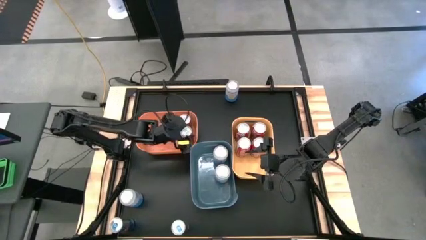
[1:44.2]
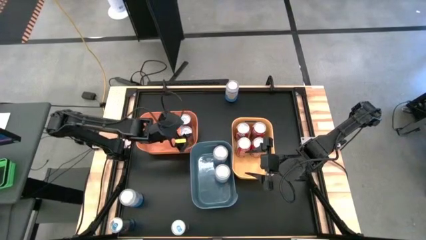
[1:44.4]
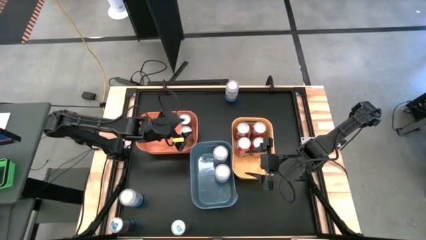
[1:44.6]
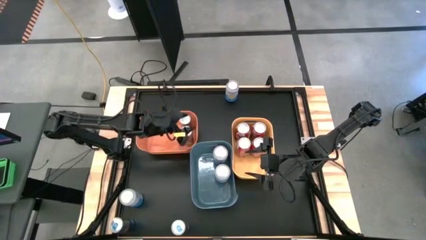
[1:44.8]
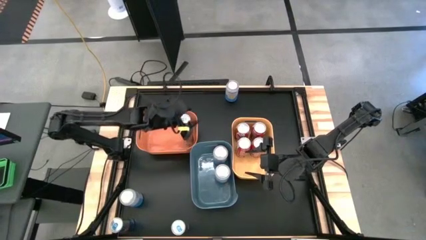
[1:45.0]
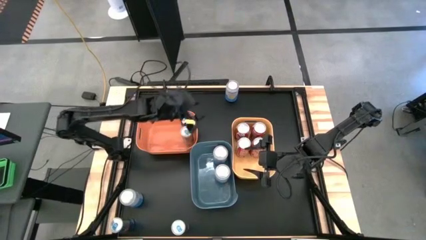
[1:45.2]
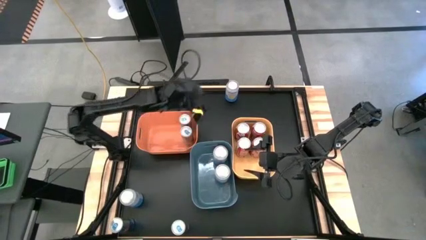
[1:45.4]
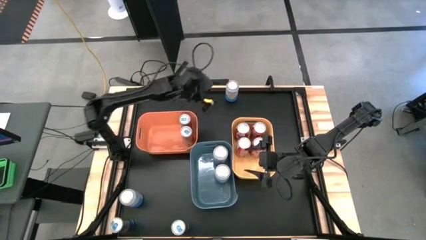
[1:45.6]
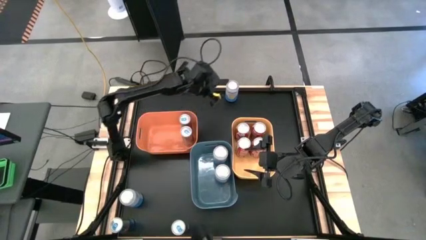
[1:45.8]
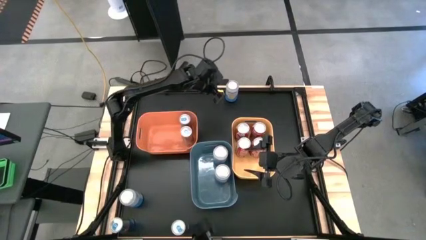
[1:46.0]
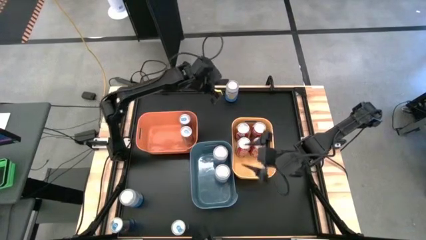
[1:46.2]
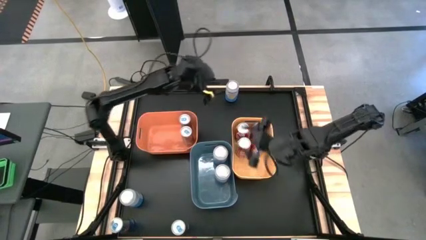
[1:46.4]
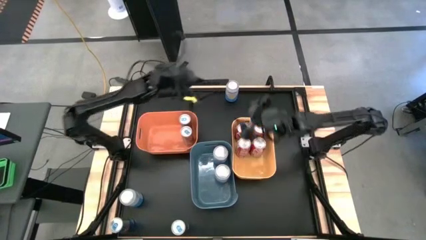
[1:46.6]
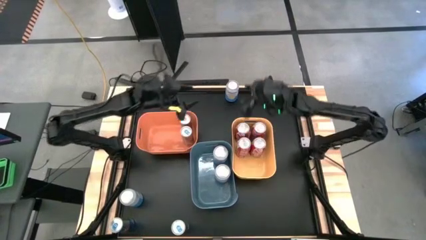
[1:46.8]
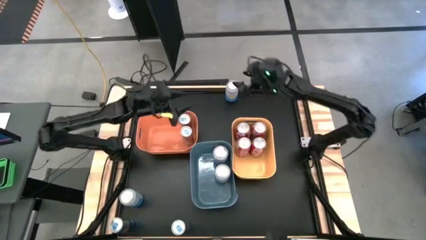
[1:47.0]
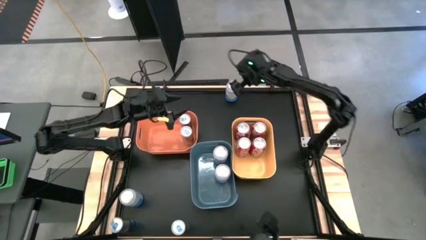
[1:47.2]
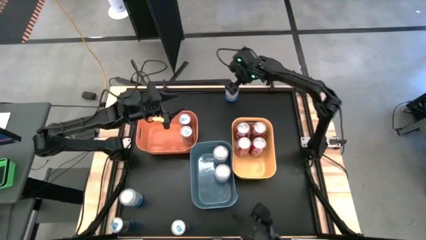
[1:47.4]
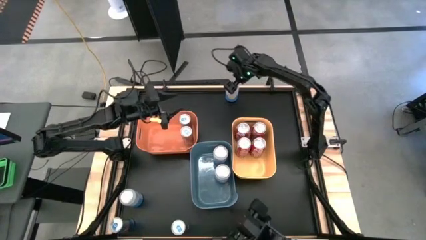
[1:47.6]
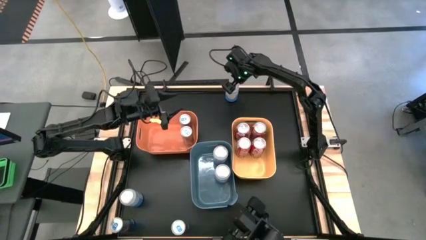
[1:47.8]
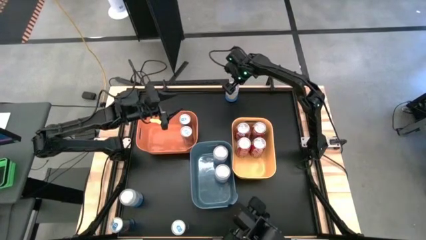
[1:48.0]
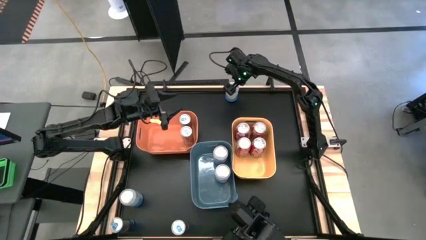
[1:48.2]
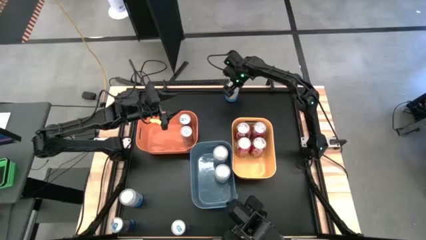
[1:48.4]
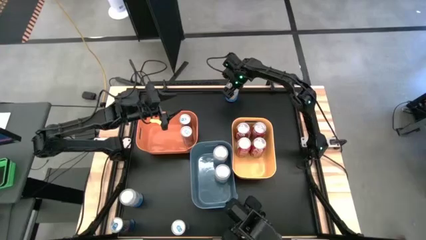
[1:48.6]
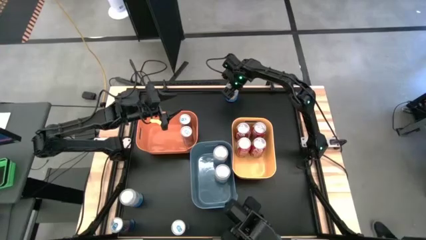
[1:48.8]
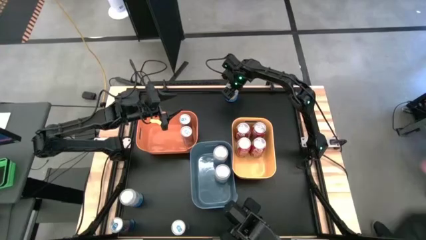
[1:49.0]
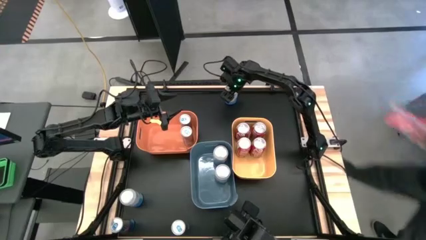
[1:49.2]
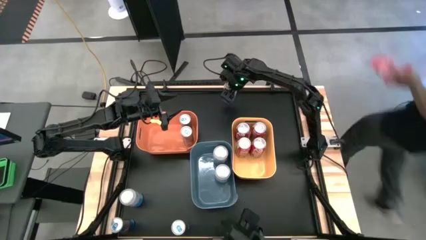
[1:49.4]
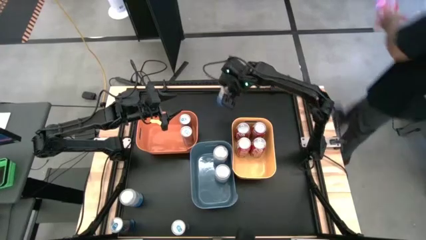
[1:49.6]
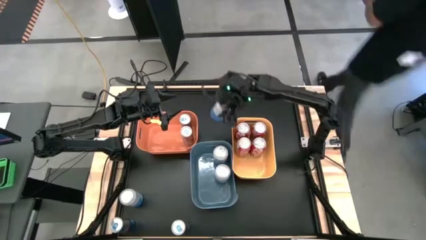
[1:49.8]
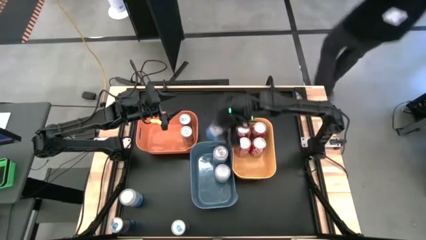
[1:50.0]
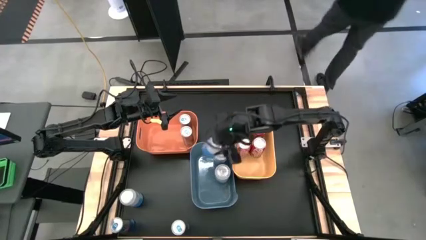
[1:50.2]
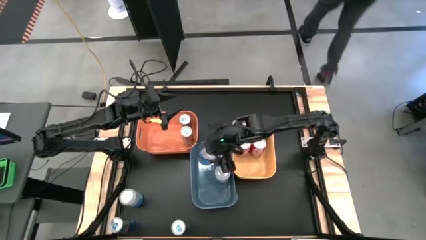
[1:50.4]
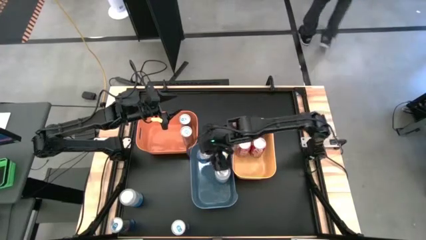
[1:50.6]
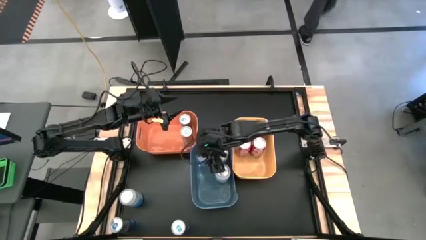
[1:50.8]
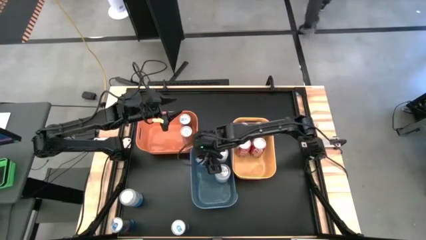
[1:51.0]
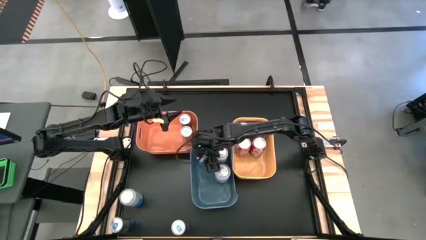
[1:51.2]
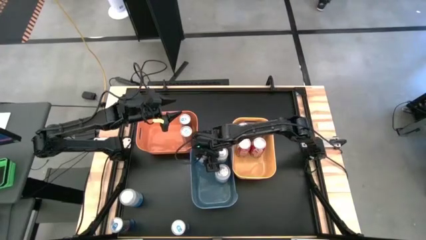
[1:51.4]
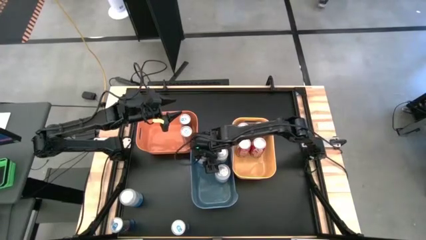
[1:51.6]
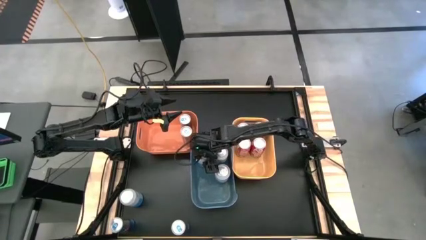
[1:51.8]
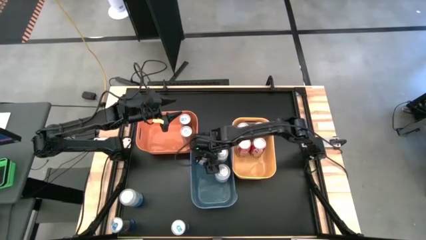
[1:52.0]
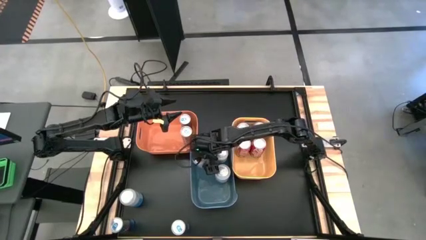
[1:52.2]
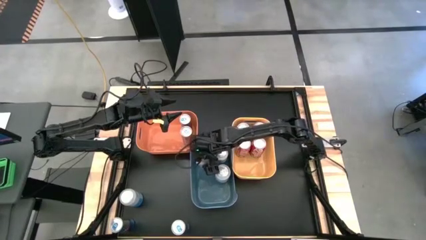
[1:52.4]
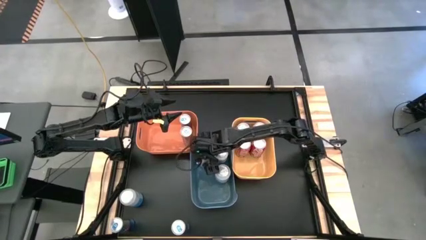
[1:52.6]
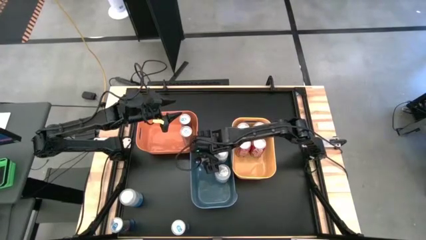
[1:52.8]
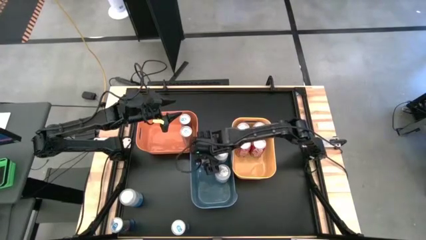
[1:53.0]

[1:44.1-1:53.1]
Task: Sort soda cans
Put the top blue-white soda can into the blue bin

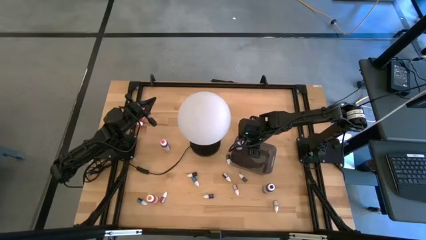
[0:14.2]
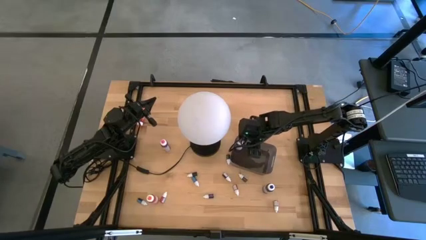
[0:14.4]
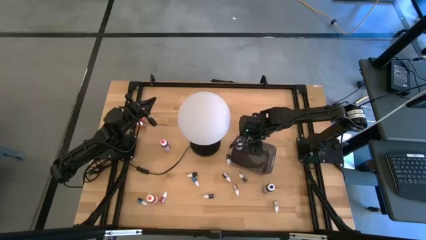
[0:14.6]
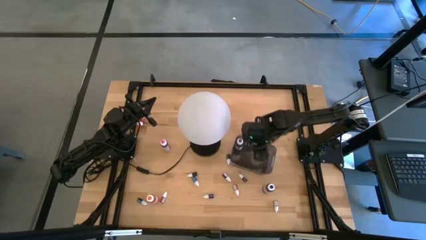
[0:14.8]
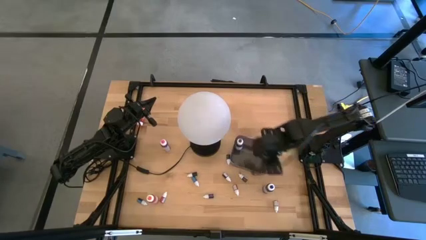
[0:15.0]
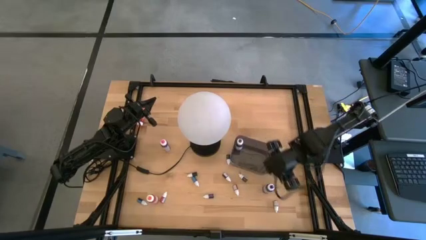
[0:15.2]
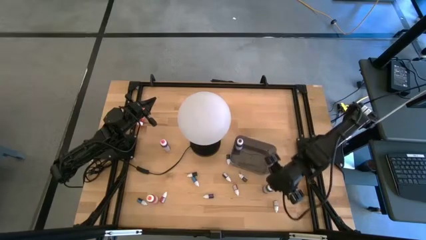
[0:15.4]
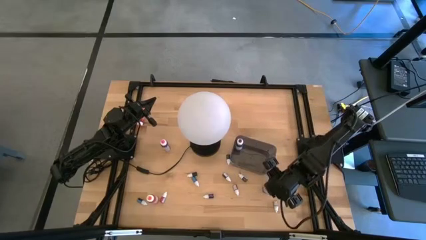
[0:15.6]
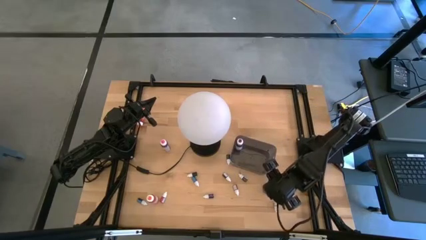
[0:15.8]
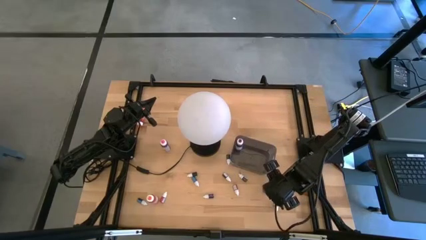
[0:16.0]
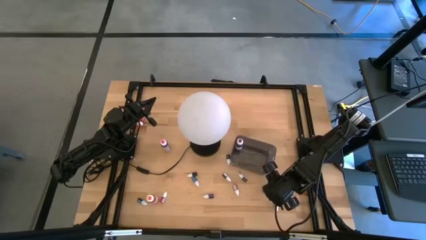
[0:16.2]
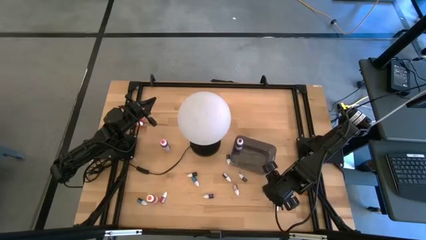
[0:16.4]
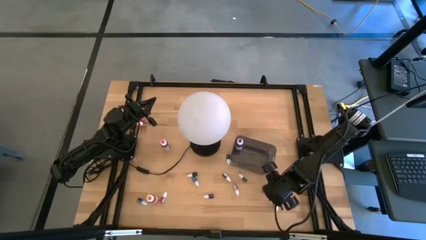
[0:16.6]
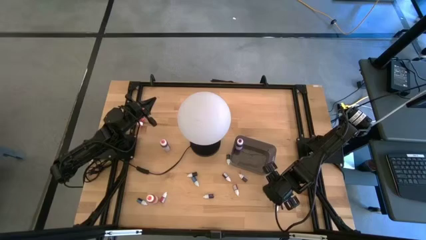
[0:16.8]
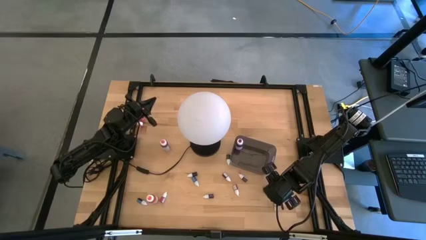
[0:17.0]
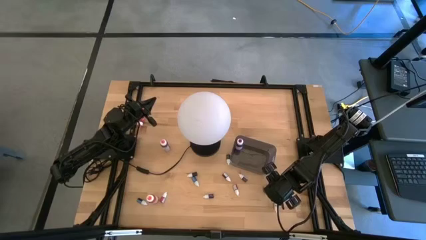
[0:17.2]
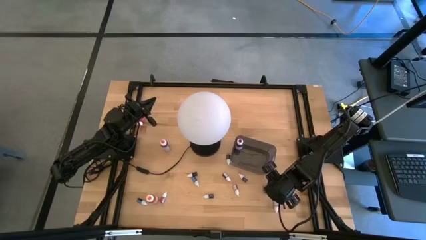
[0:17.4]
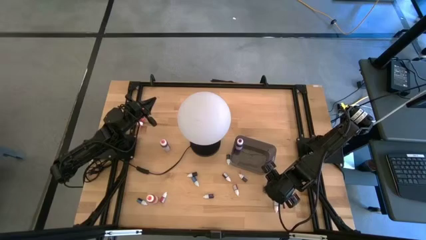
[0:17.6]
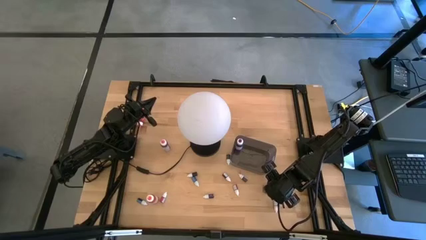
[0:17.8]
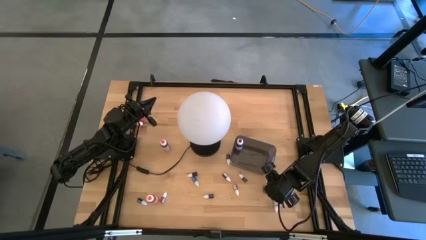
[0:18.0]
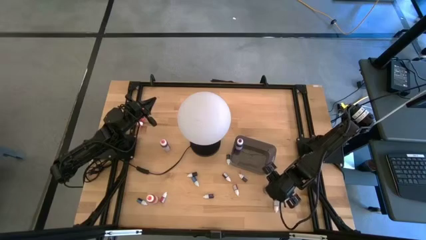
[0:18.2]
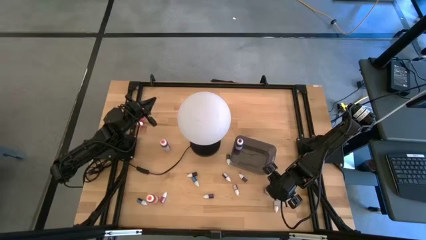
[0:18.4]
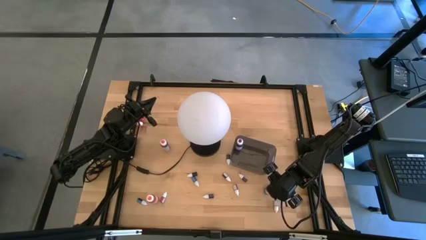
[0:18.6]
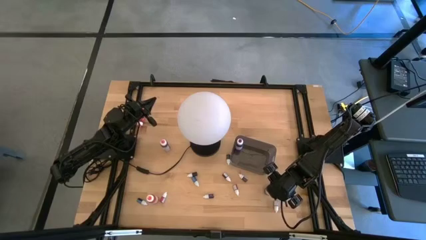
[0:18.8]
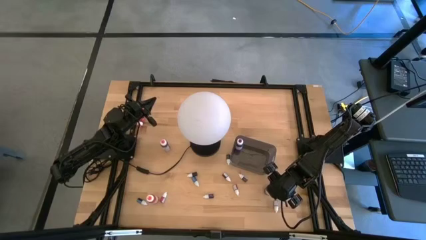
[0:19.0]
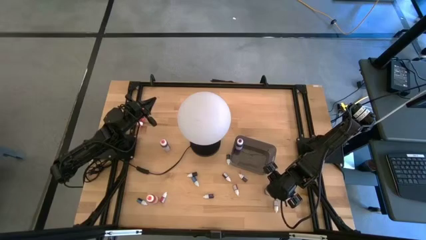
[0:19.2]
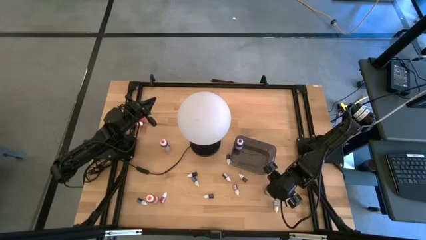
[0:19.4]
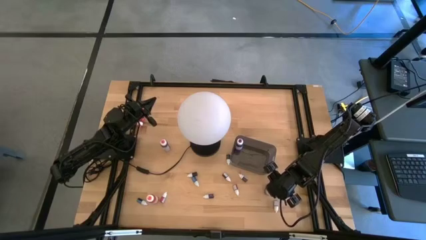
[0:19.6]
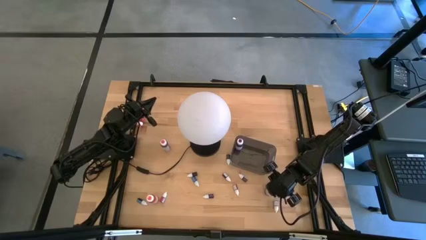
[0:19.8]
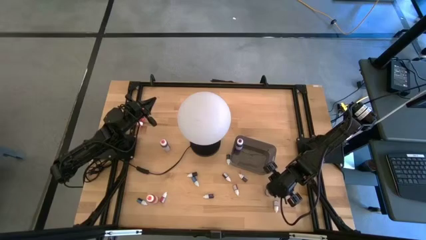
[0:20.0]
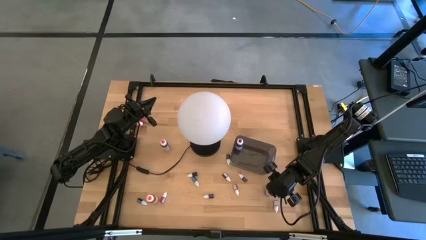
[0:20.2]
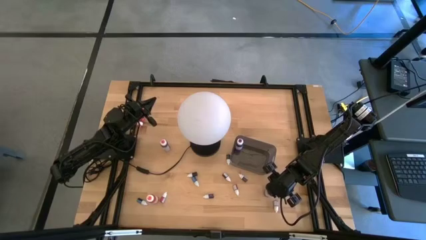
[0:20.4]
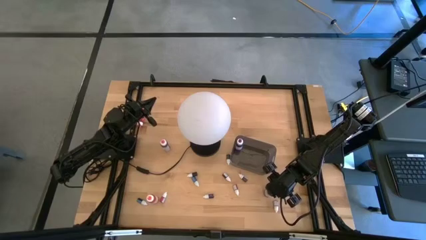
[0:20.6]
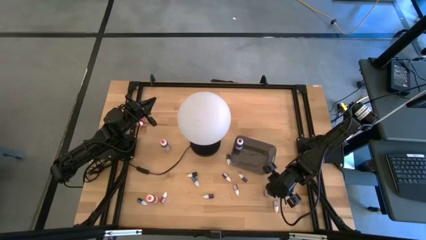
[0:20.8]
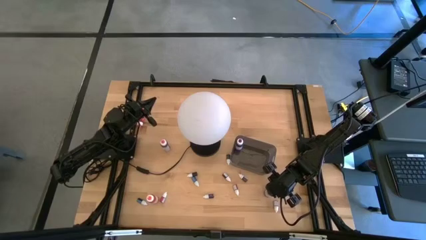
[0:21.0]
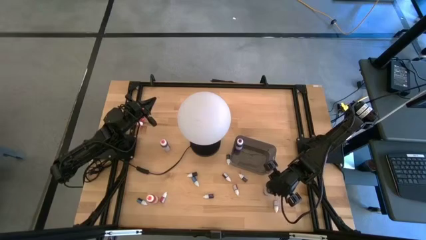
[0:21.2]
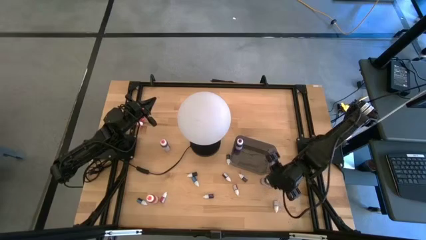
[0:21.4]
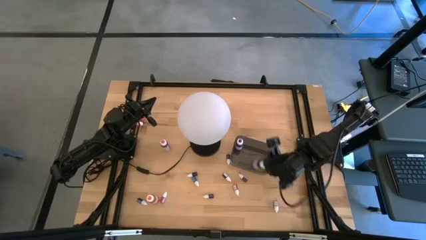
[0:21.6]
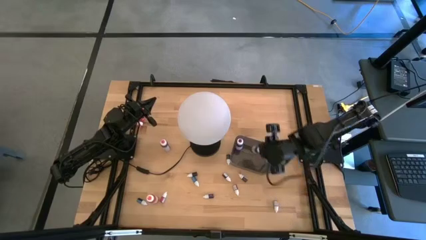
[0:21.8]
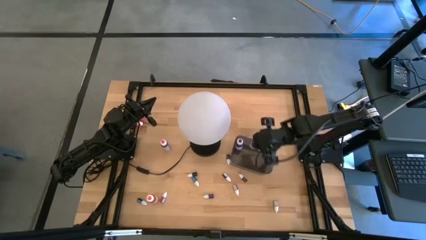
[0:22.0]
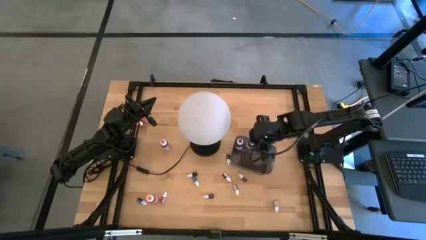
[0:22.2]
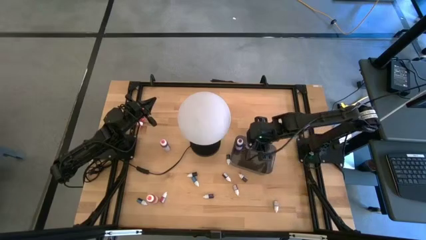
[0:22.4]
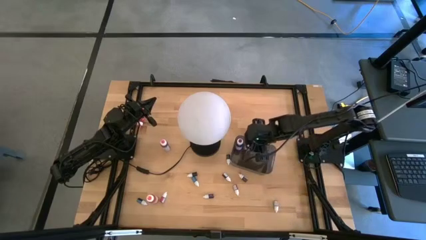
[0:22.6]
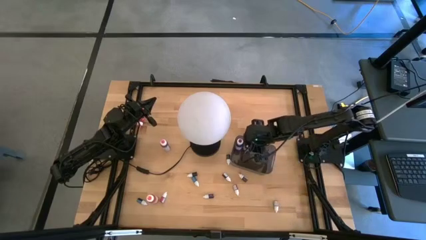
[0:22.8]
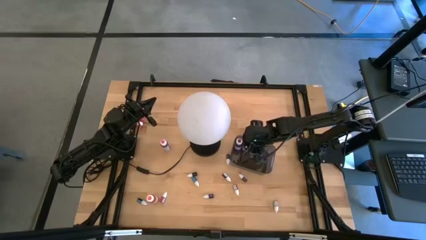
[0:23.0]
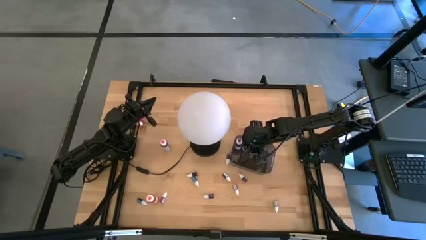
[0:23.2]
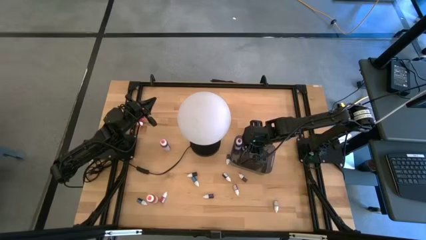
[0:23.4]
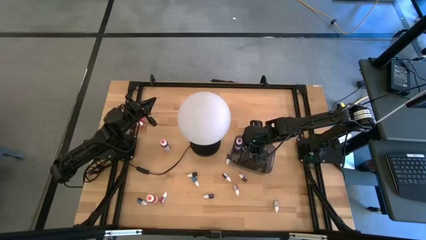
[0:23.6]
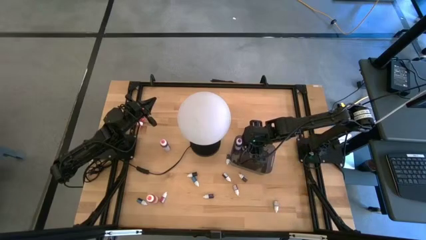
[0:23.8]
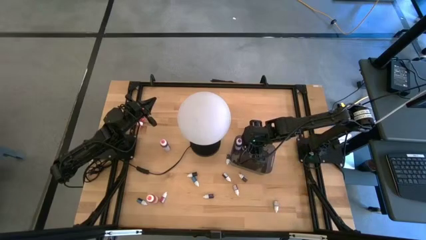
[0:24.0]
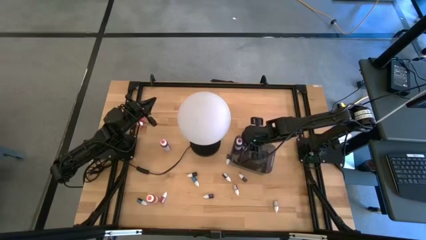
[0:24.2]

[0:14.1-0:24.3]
Task: Pick & Place food coloring
Put the large blue food coloring bottle into the black container
